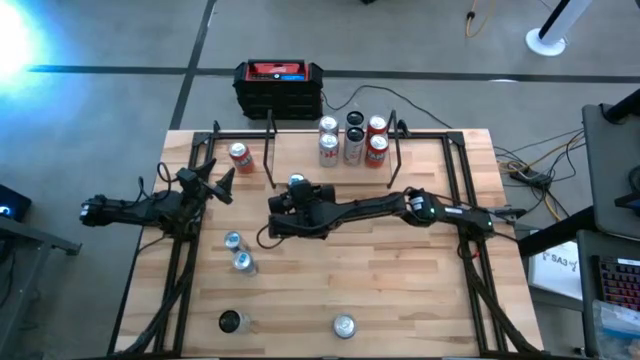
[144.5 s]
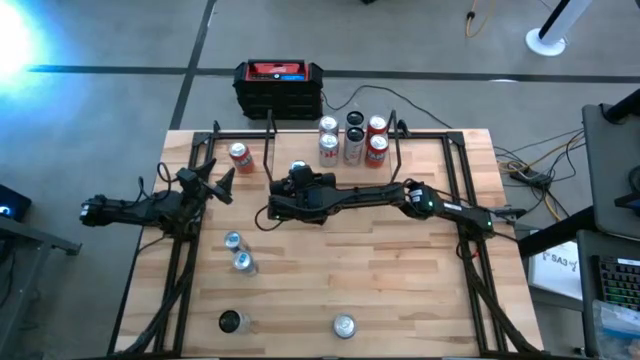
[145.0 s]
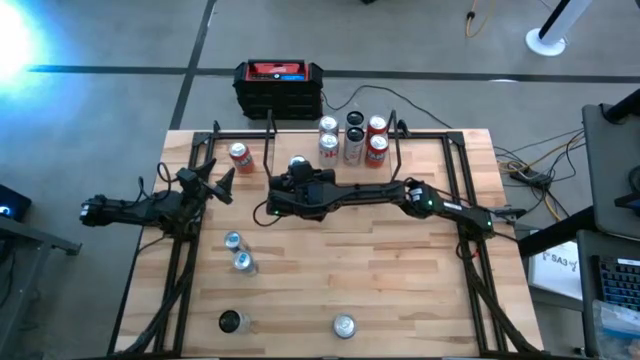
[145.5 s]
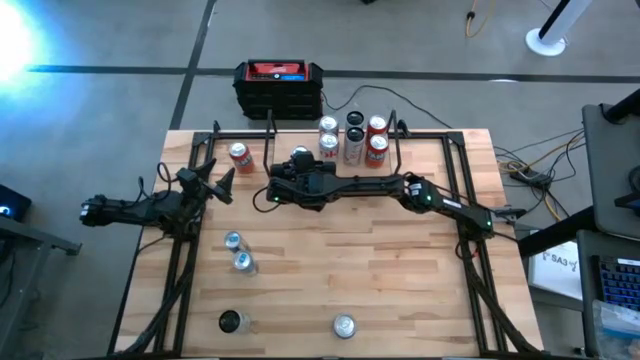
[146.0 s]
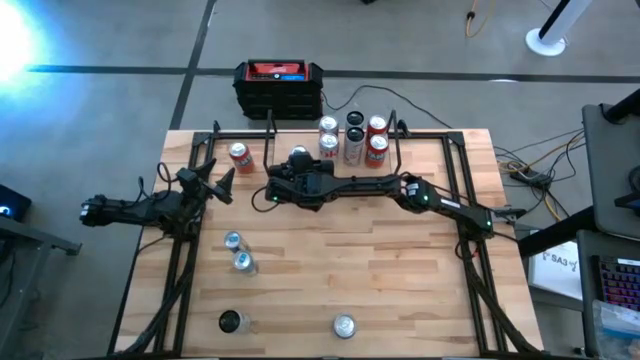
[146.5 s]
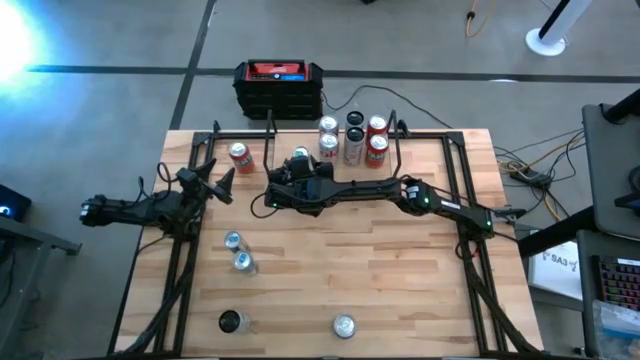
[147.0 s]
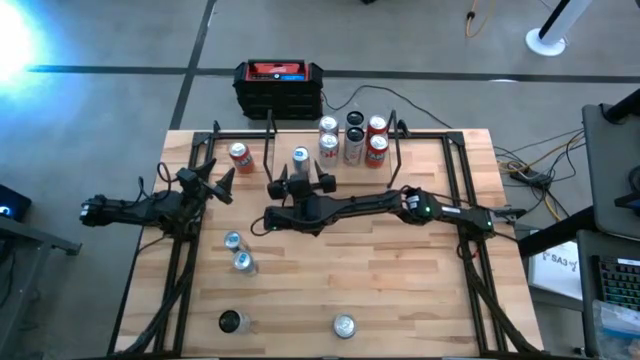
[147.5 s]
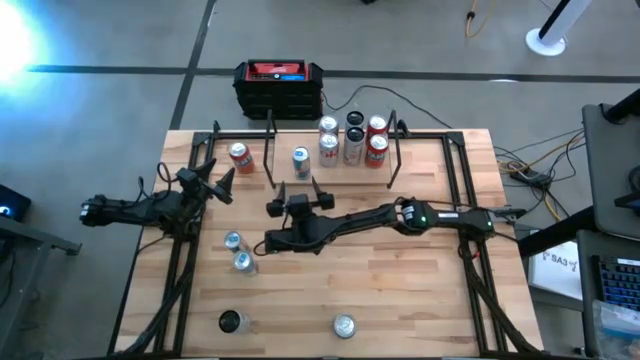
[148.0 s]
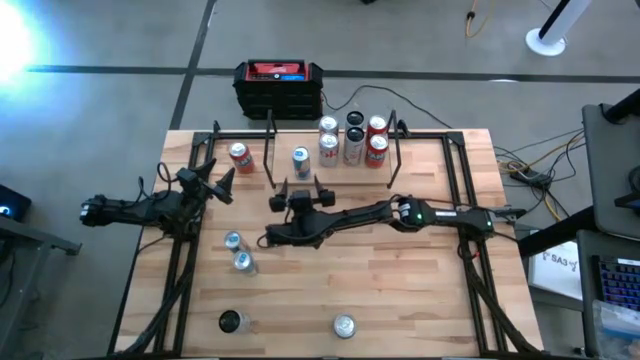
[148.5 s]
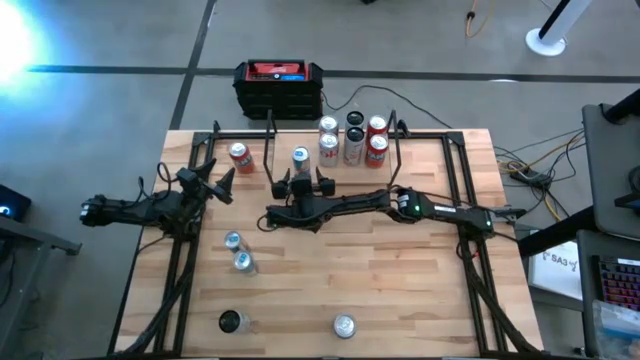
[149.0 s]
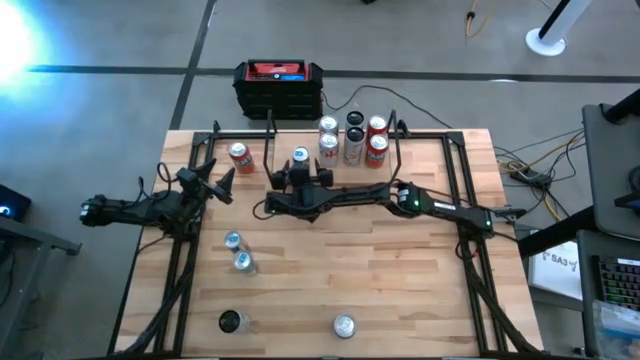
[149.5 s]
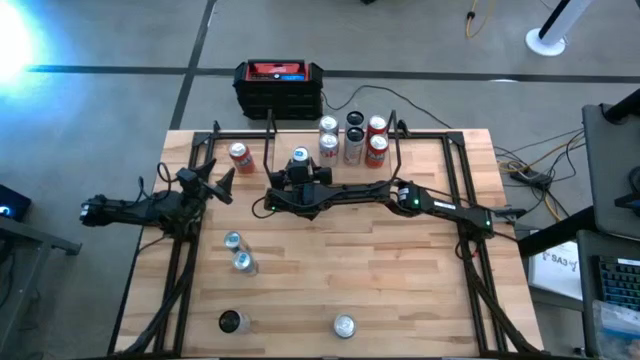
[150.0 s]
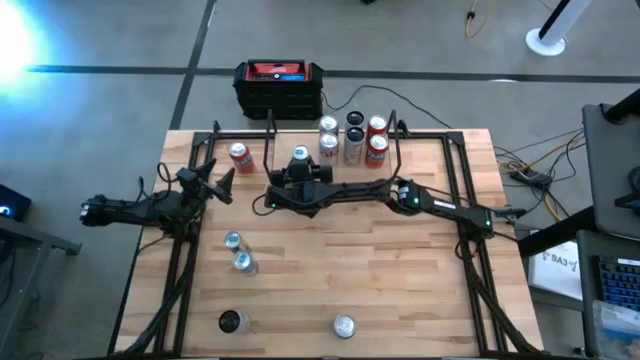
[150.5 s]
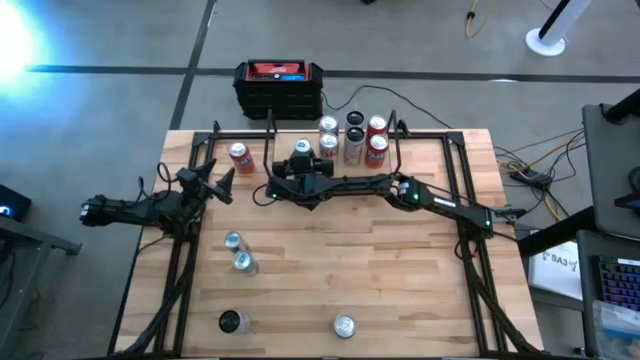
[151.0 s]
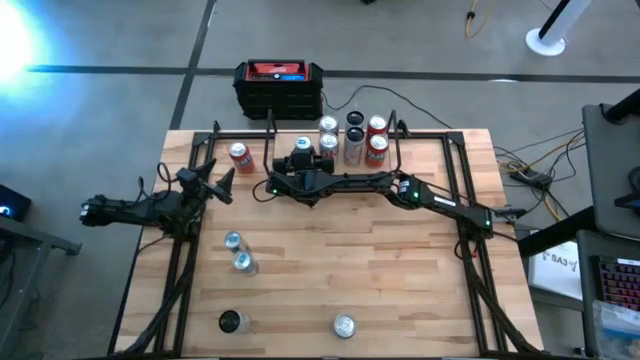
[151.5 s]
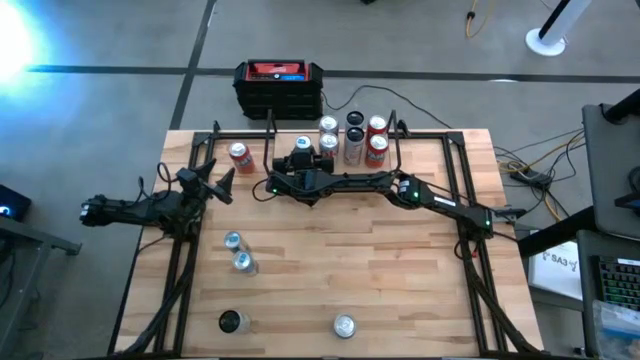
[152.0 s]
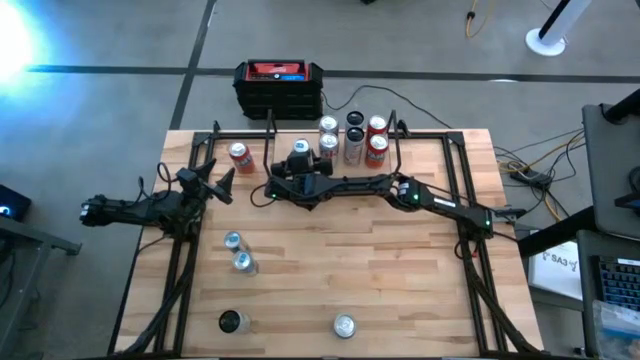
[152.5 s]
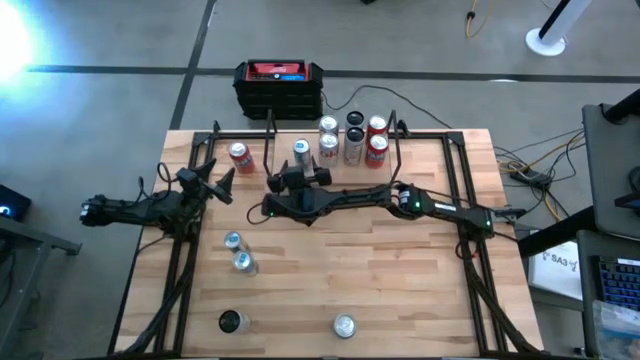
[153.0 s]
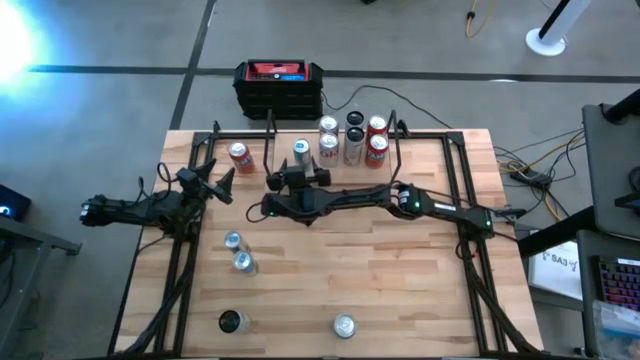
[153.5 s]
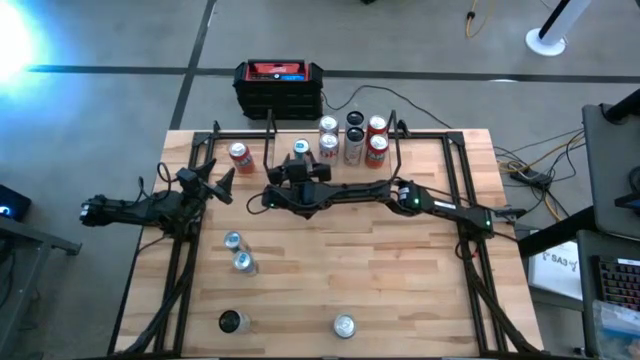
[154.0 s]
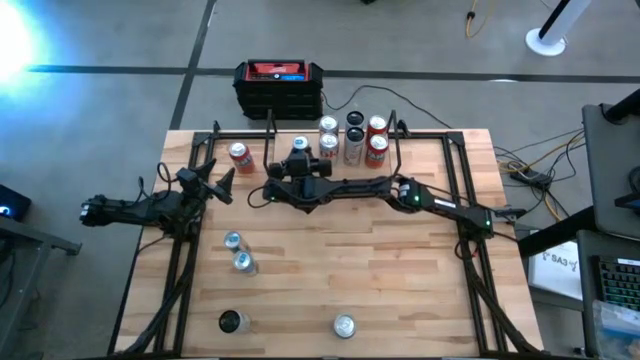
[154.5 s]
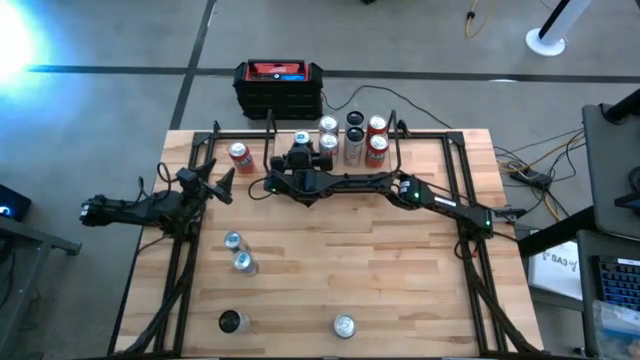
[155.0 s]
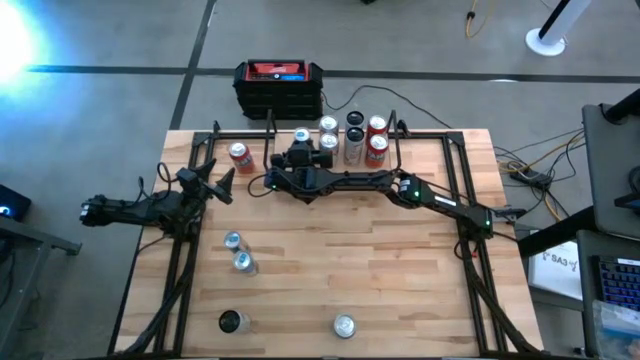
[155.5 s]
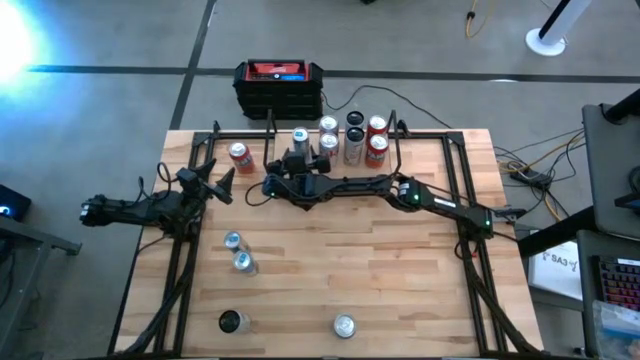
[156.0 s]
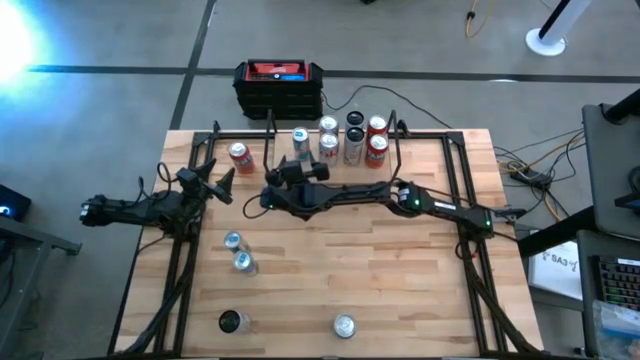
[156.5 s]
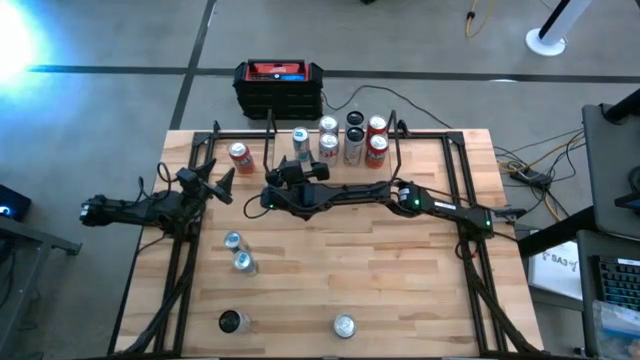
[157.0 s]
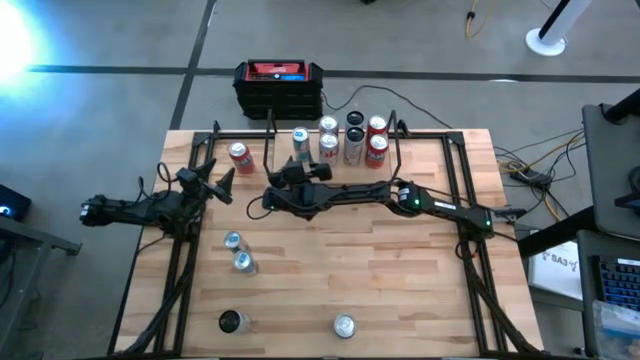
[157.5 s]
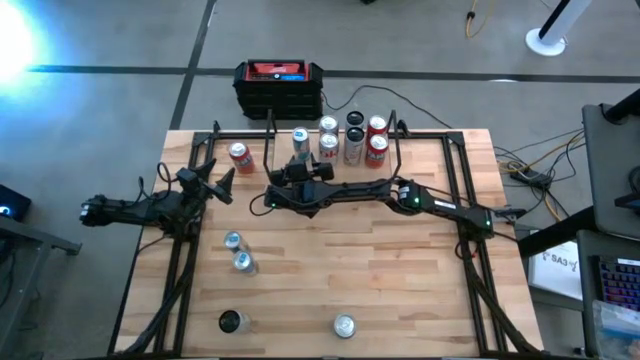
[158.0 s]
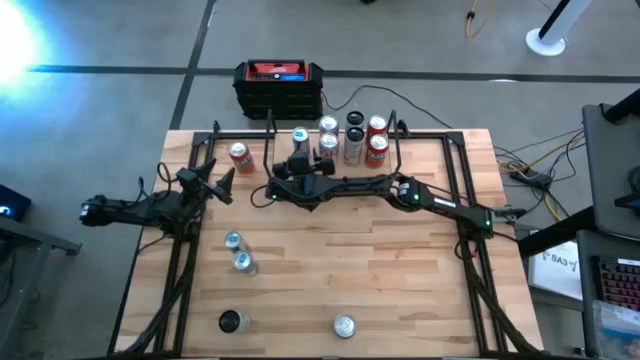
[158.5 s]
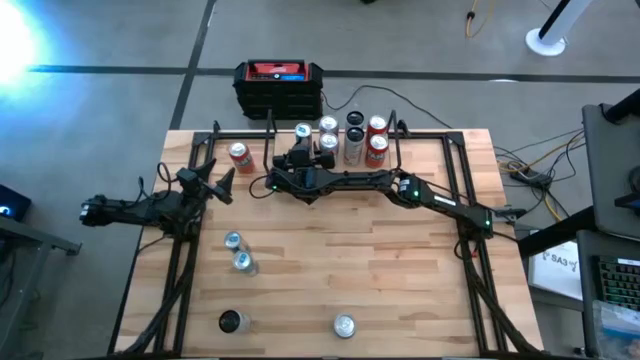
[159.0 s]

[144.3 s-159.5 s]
Task: Place canned beverage on shelf
Put the bottom blue soda can on the shelf

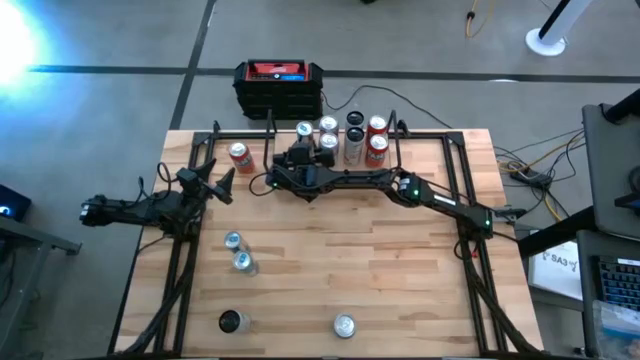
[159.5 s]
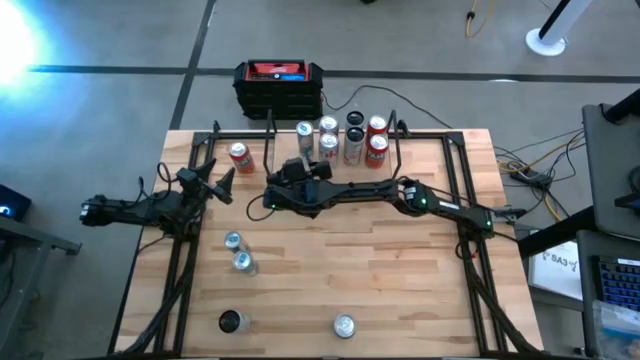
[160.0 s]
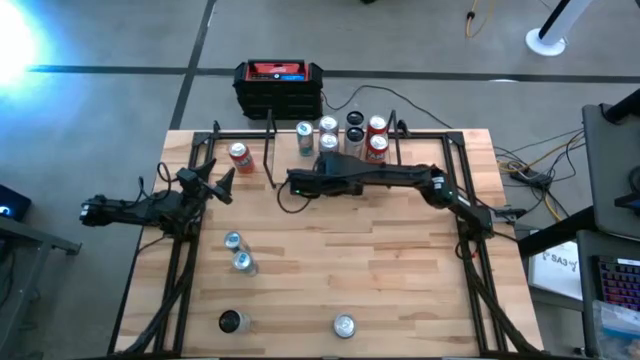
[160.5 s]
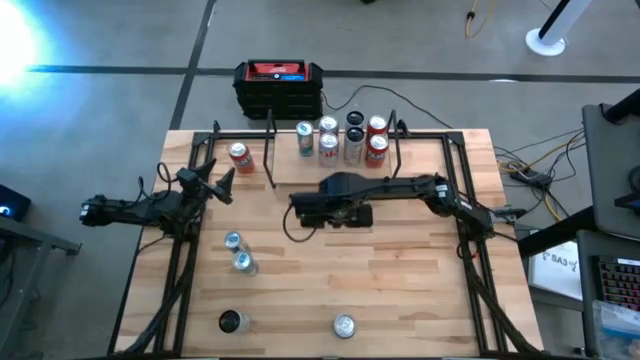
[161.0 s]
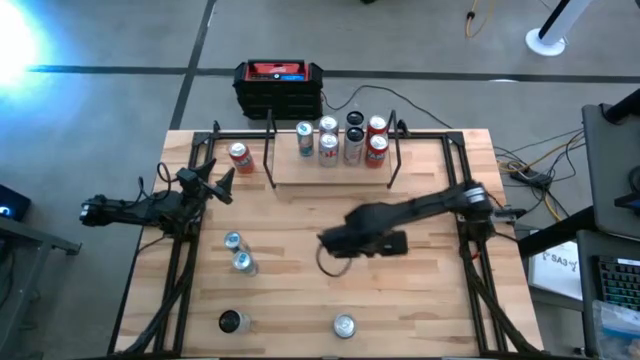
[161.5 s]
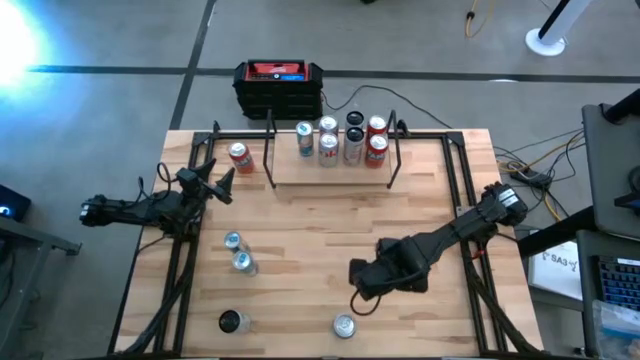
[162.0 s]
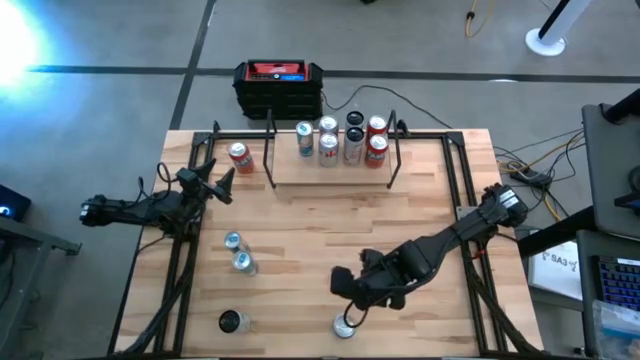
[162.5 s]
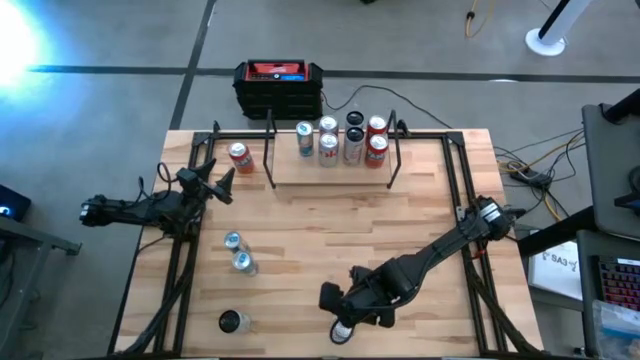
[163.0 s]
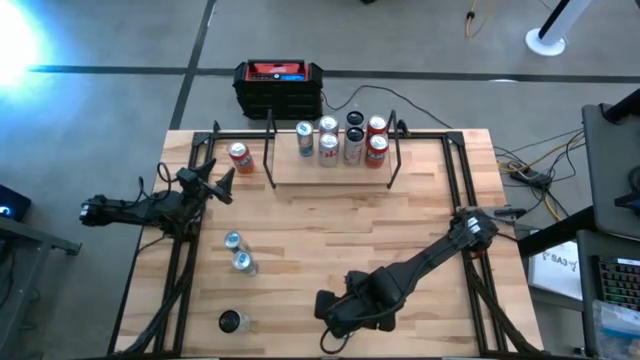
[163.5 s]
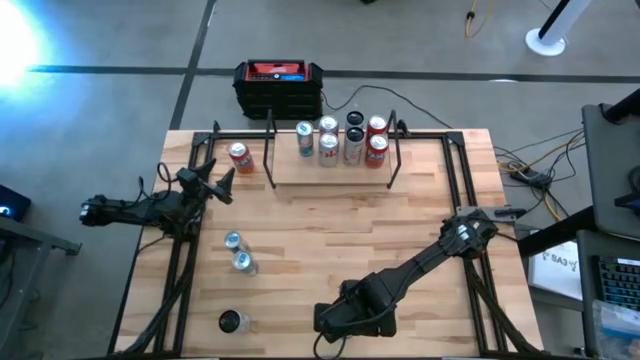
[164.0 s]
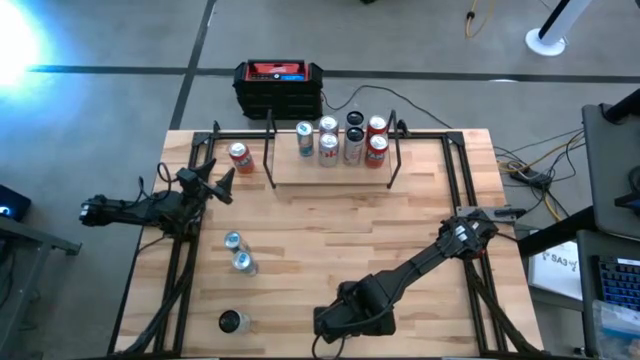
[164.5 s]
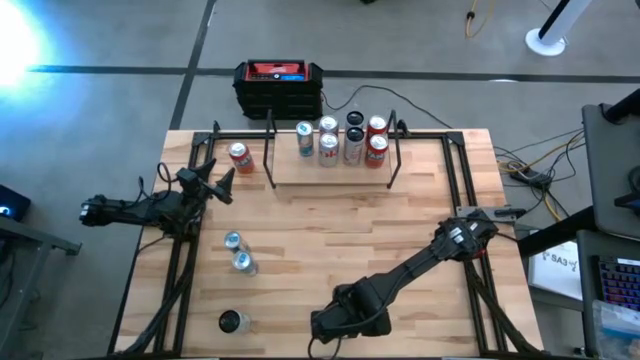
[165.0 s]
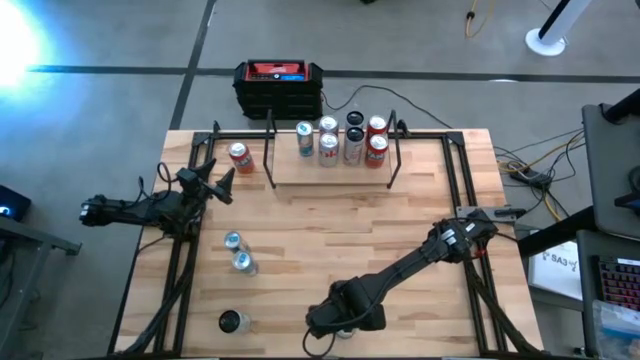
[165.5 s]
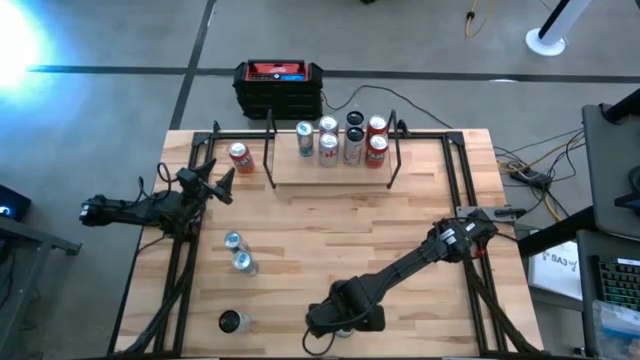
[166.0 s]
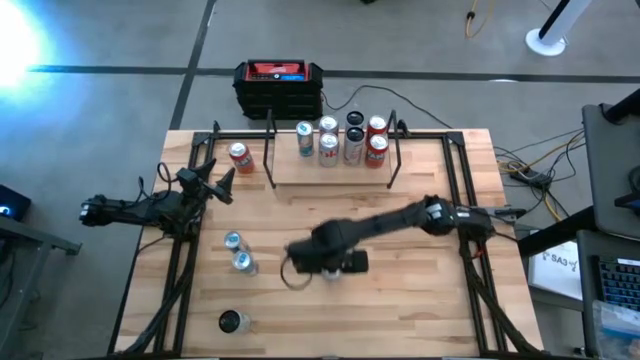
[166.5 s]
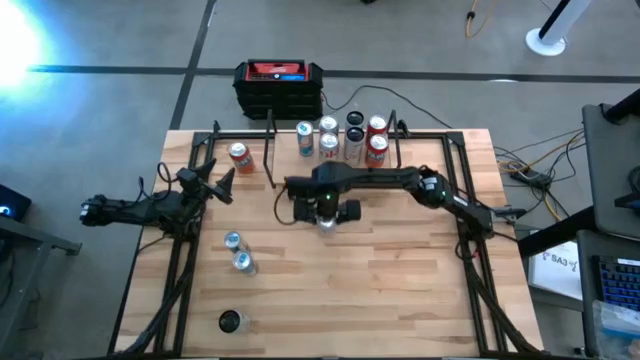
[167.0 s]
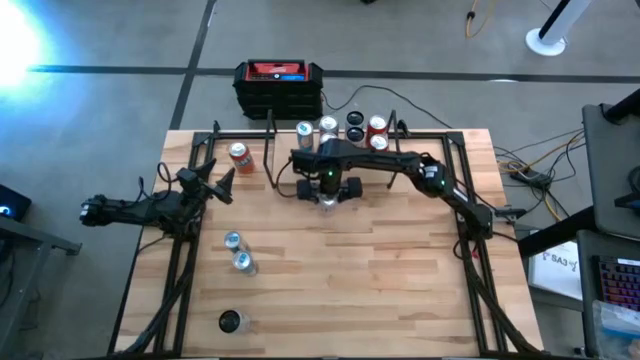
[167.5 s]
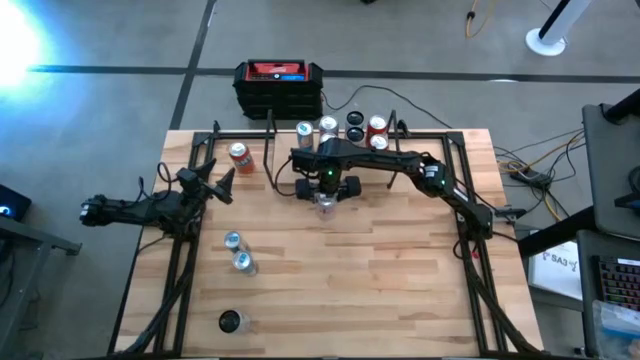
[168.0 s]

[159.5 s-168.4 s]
Move the silver soda can to the center of the table
